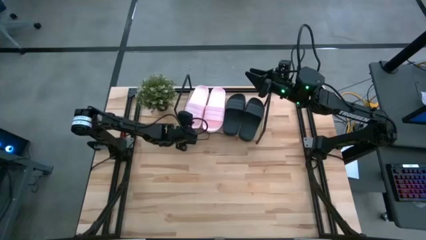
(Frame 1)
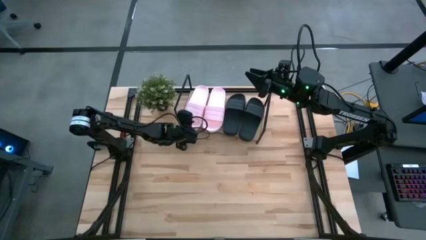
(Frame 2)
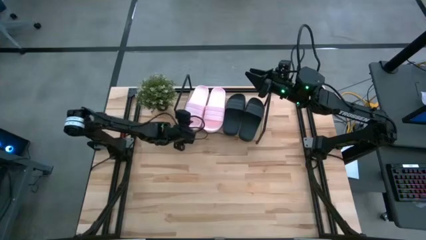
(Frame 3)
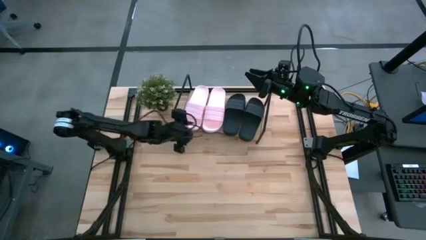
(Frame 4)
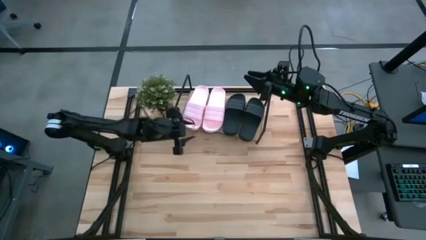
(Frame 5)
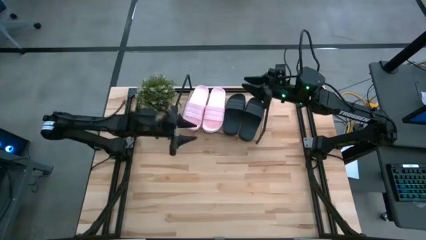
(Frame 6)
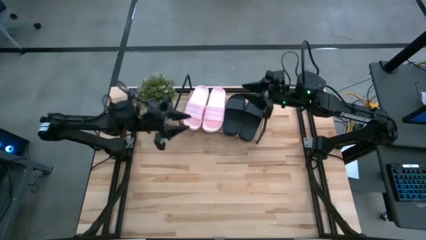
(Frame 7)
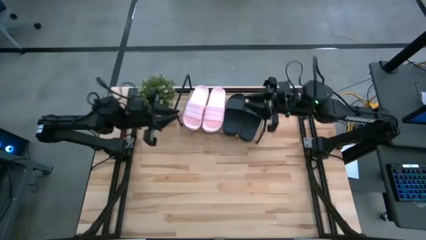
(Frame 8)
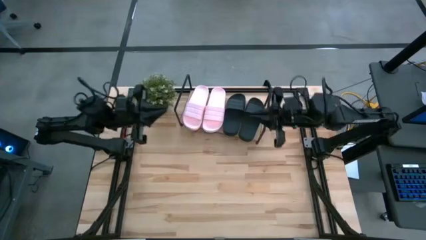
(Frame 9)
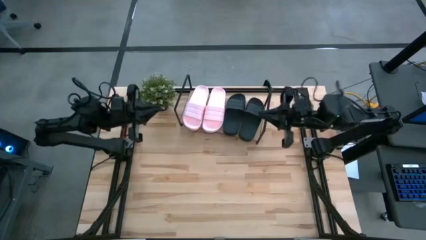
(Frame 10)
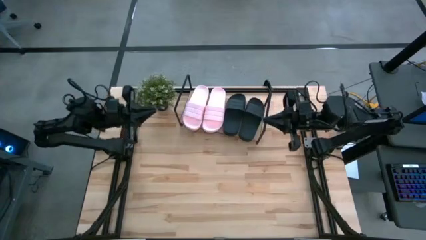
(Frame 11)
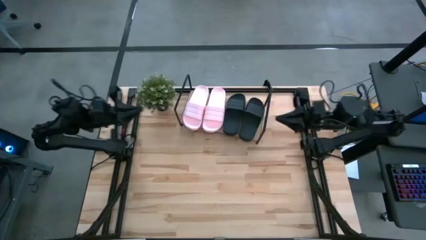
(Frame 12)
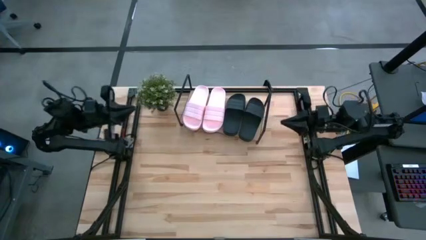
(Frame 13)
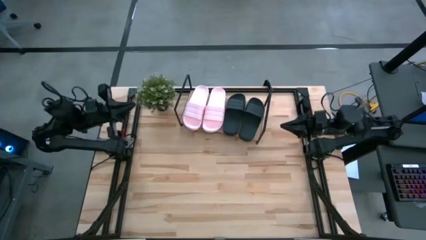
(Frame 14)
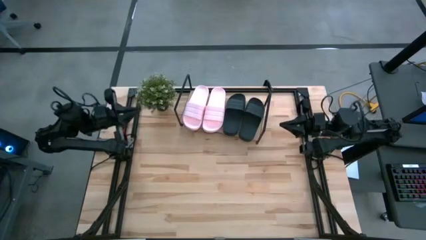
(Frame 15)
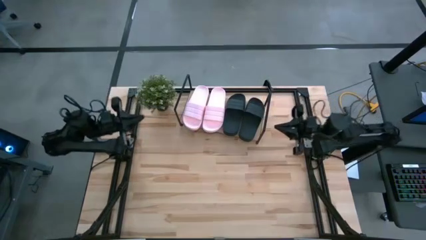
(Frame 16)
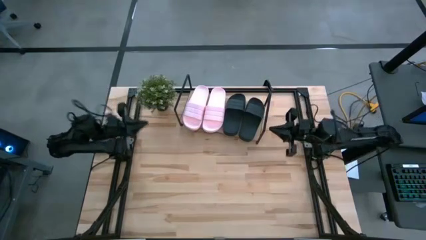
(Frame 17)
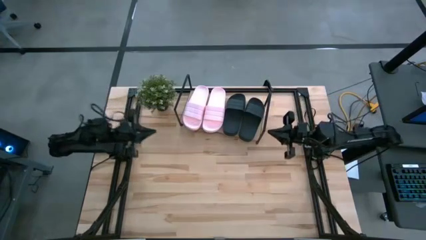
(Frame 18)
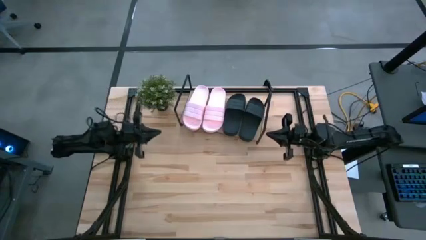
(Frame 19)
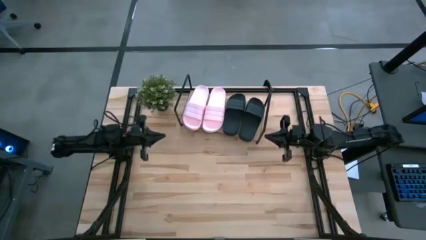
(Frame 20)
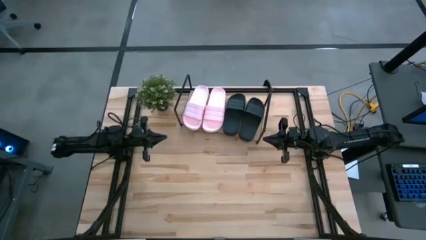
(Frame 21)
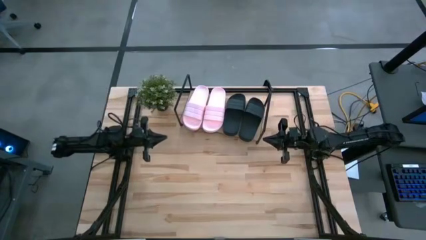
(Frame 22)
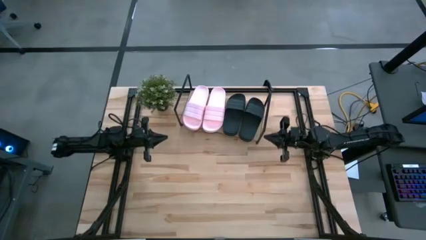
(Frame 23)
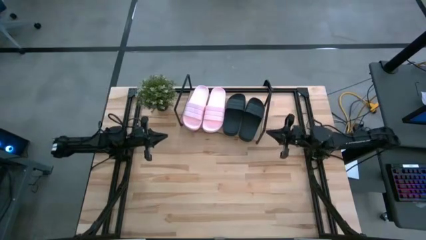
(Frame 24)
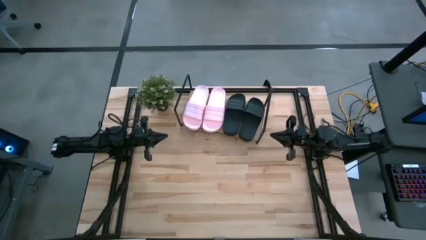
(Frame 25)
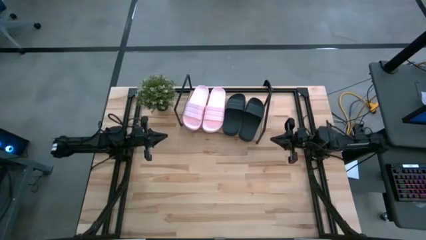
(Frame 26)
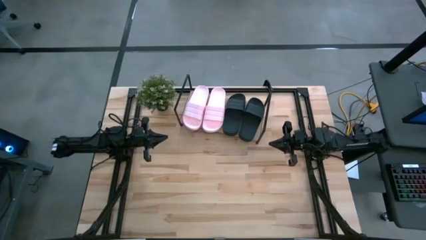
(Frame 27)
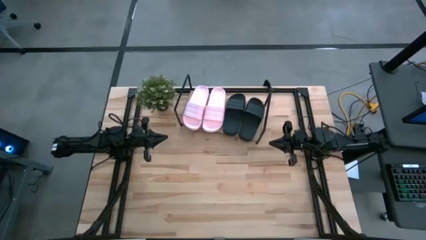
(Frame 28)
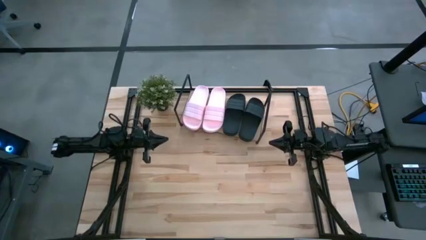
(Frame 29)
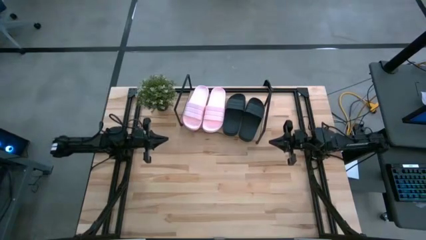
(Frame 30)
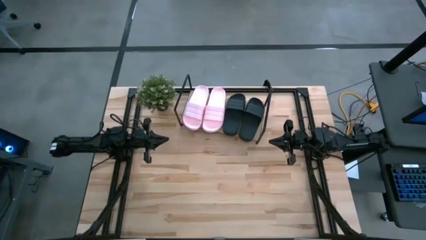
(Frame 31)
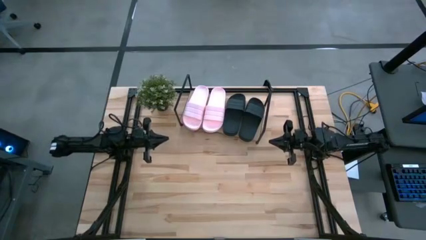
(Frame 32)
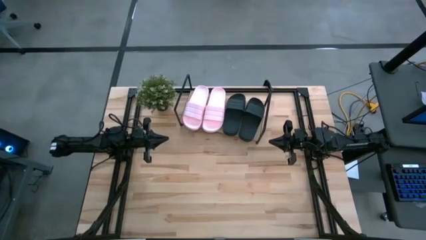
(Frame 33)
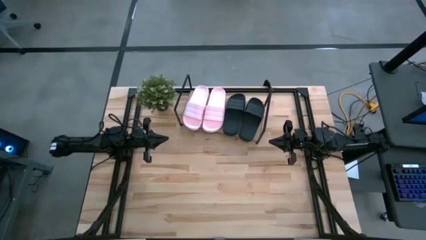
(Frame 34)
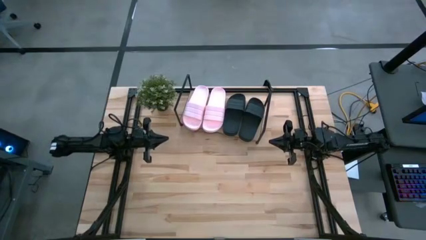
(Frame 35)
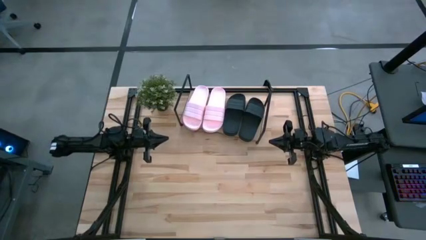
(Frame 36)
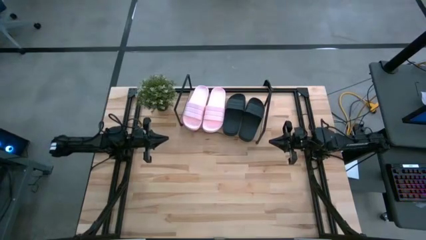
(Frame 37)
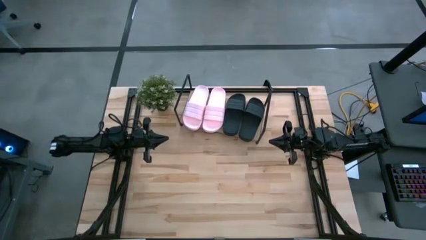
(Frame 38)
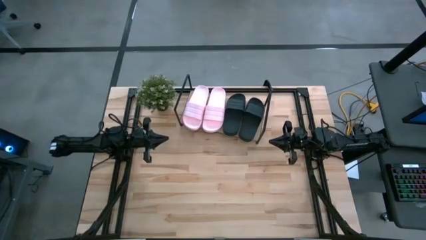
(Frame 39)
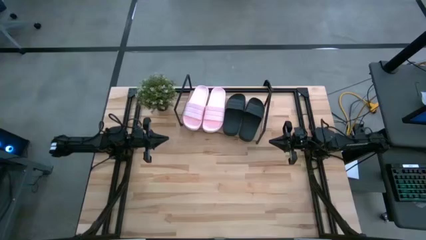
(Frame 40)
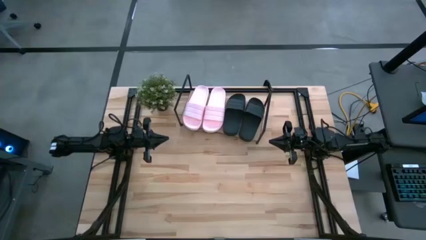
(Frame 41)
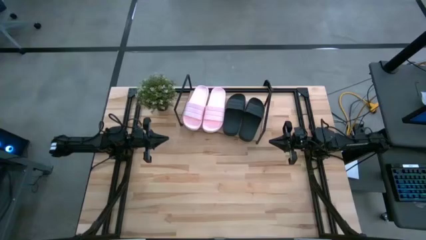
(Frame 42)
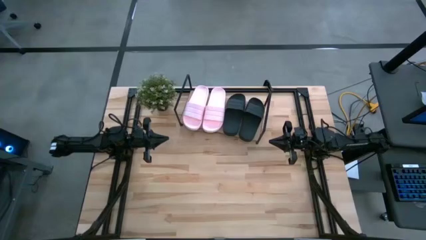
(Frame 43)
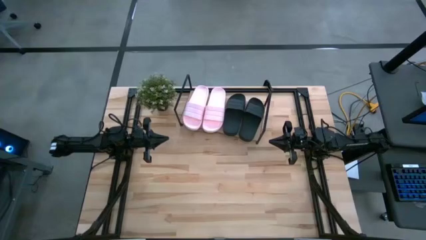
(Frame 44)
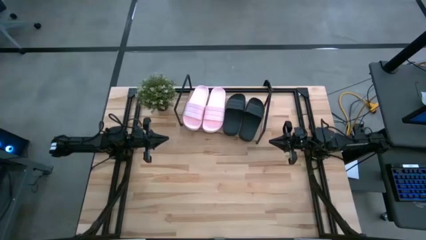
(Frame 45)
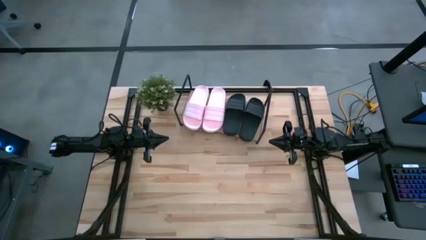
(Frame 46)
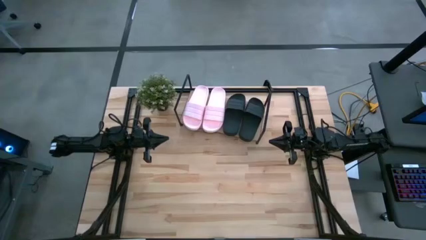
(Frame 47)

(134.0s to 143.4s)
Task: Pick and place slides into the shelf
Return to Home Position

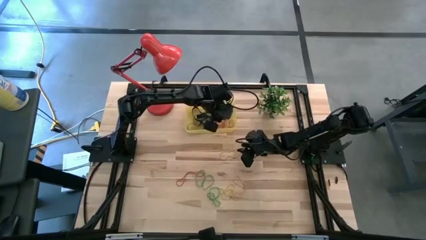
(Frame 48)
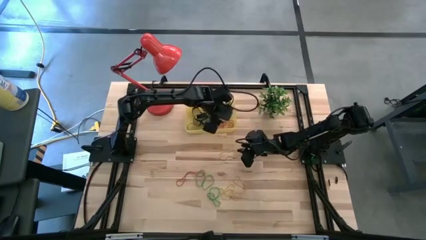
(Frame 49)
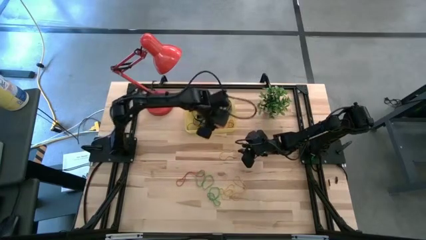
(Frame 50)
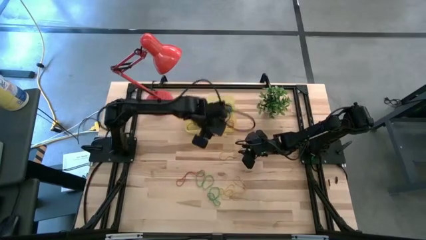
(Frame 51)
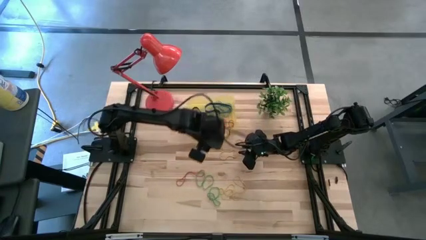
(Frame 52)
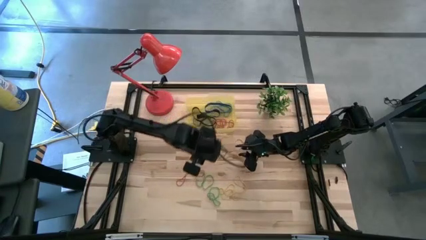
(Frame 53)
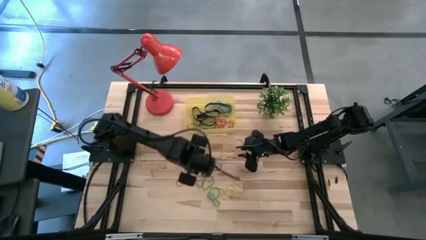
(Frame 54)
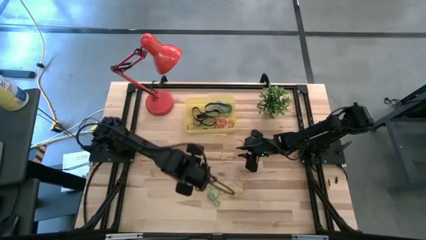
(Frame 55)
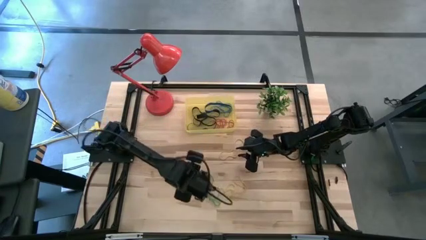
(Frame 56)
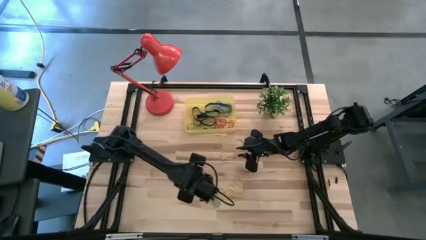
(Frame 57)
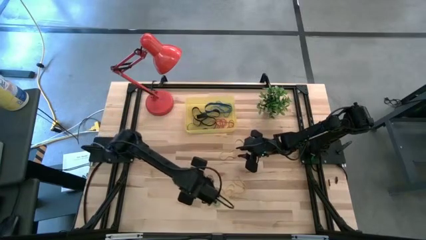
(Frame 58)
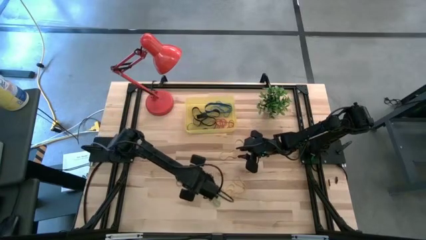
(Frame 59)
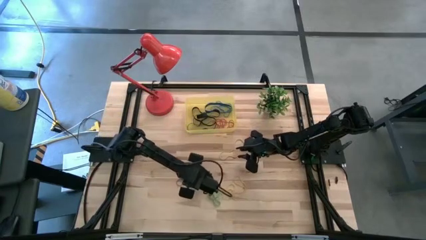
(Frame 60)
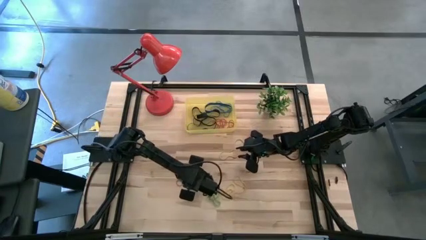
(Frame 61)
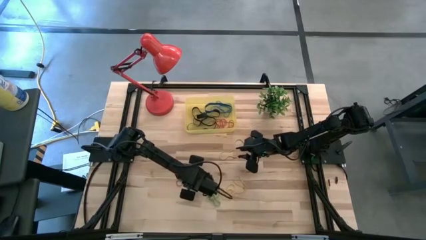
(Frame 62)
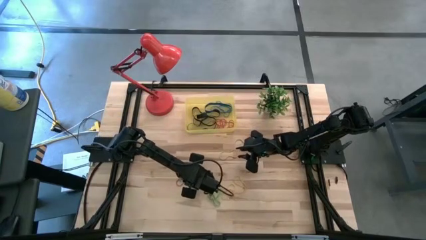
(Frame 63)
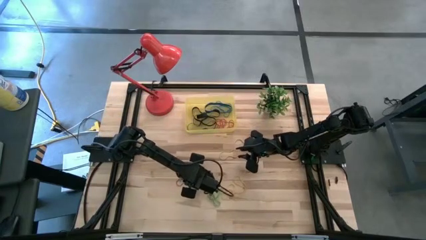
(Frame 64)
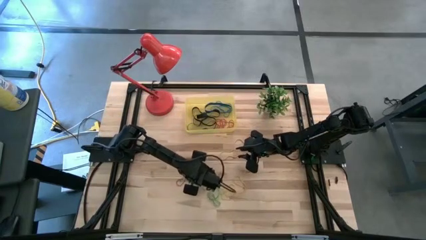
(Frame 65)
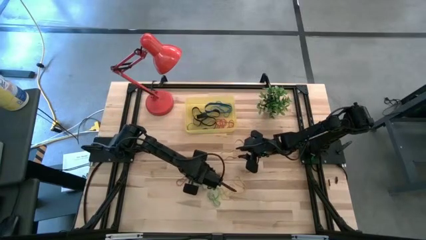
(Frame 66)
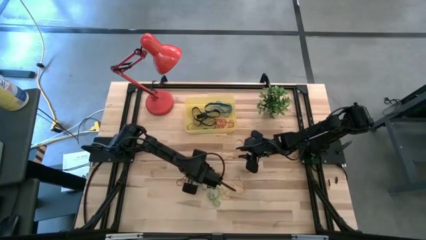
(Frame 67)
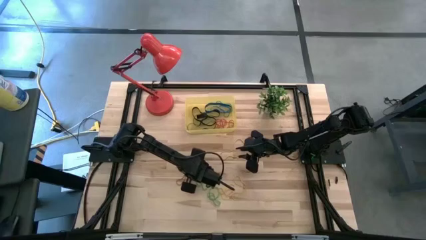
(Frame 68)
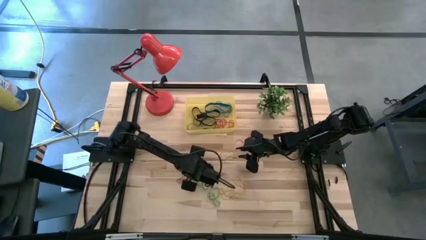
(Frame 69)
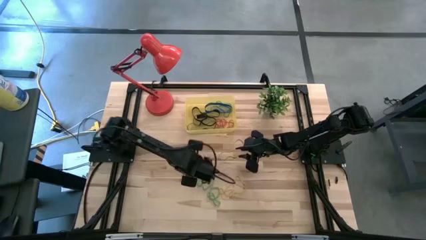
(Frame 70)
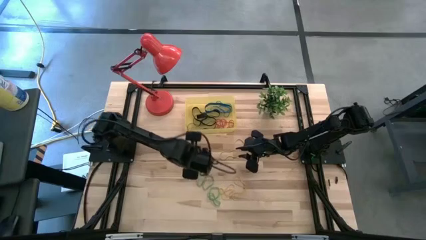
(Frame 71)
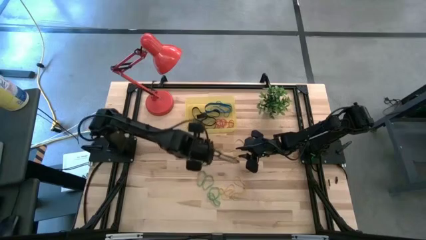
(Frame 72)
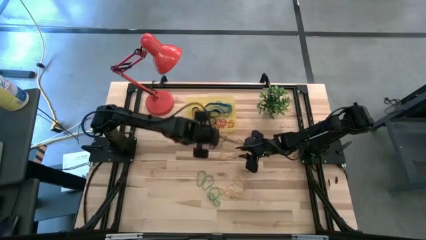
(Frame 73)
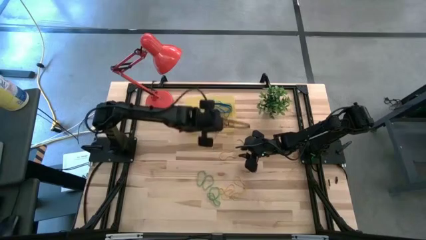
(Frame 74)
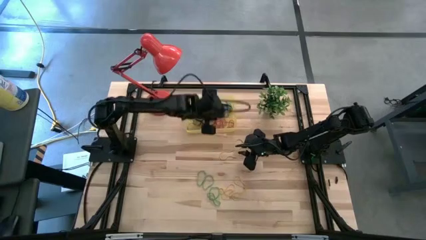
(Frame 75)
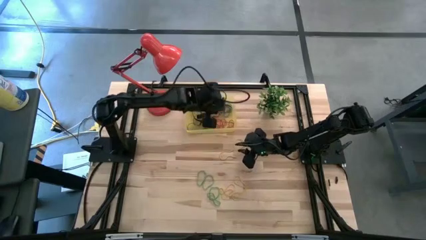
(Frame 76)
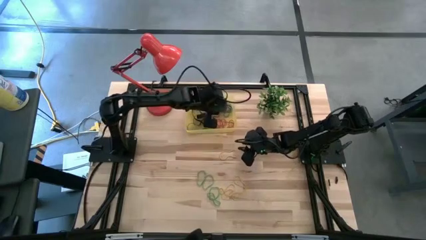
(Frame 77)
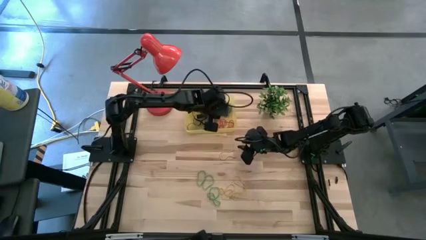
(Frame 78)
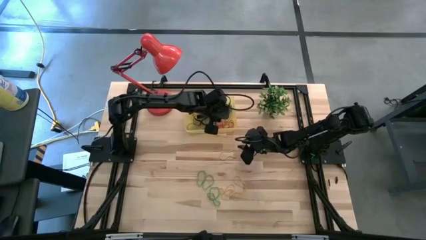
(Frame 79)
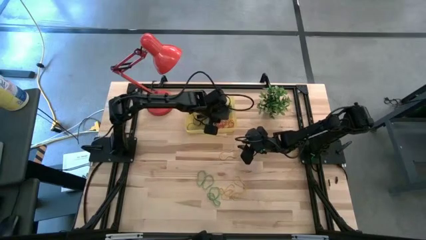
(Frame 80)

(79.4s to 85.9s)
Task: Pick and place rubber bands into bin
Put the red rubber band into the yellow container
